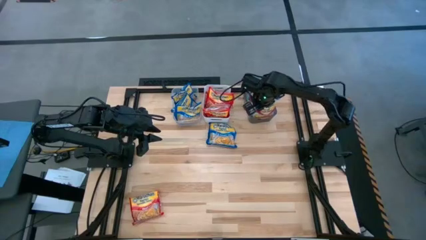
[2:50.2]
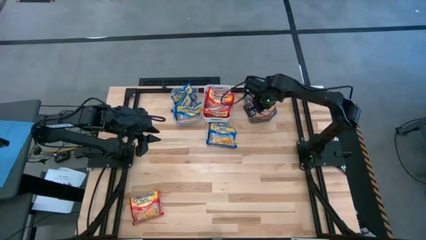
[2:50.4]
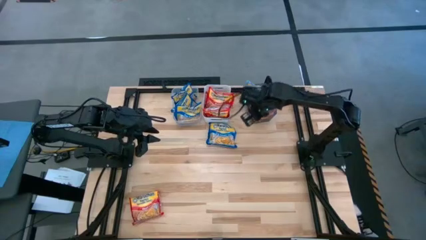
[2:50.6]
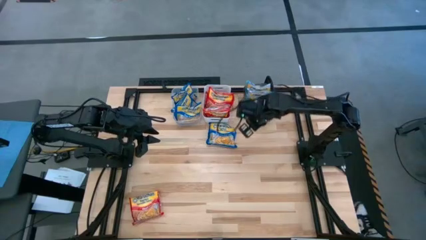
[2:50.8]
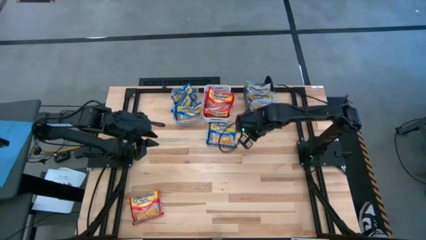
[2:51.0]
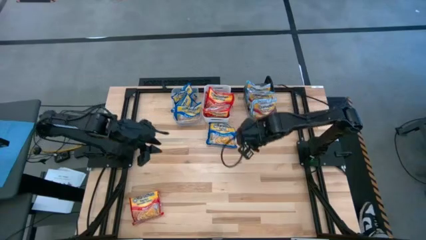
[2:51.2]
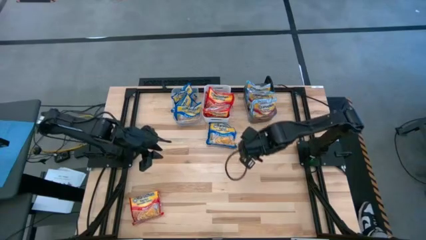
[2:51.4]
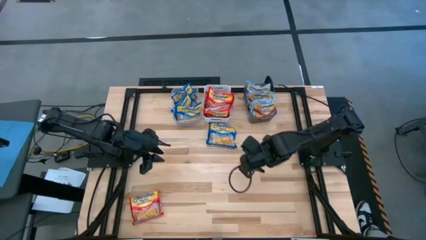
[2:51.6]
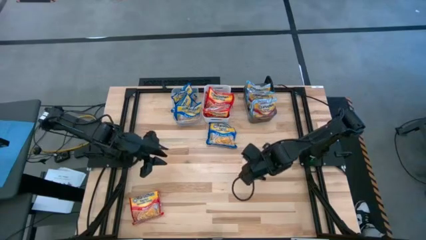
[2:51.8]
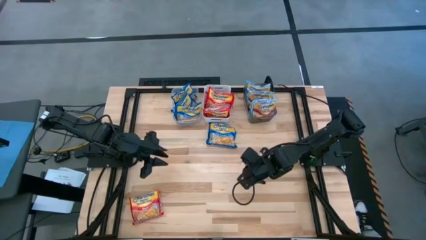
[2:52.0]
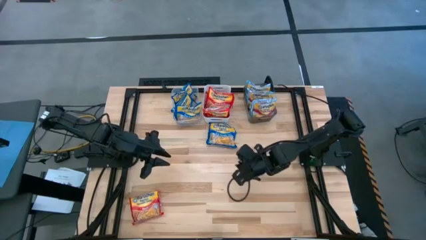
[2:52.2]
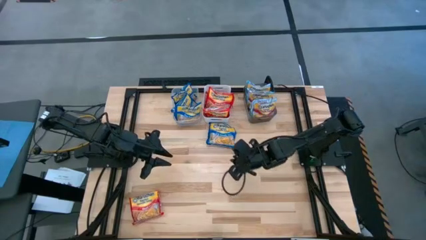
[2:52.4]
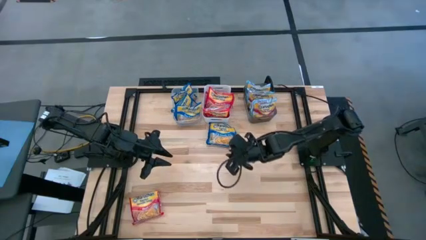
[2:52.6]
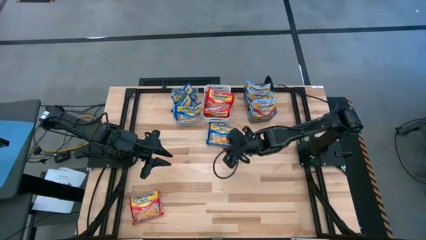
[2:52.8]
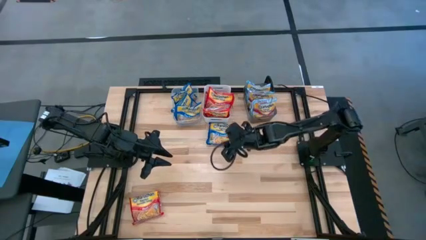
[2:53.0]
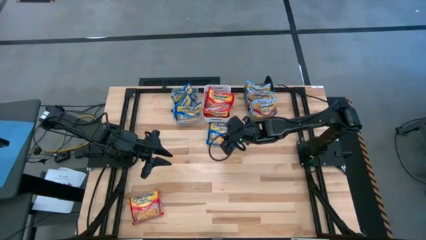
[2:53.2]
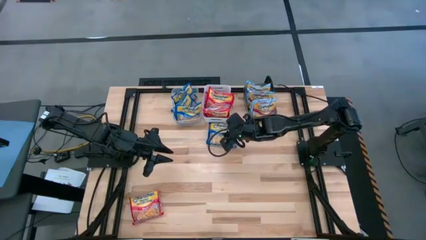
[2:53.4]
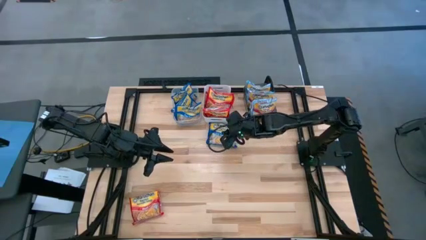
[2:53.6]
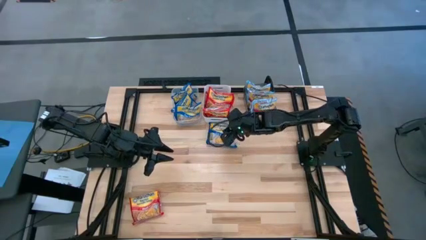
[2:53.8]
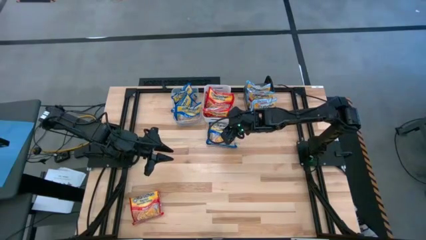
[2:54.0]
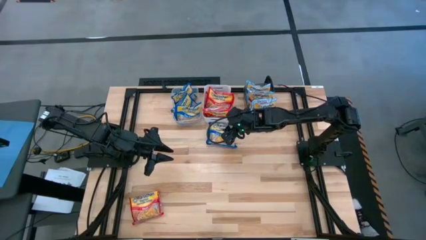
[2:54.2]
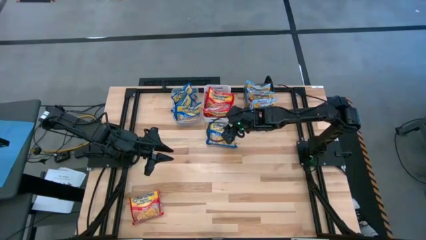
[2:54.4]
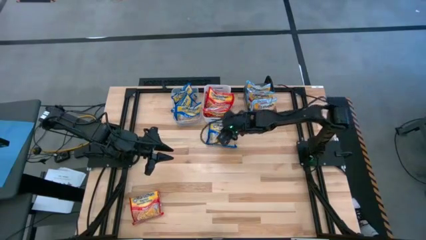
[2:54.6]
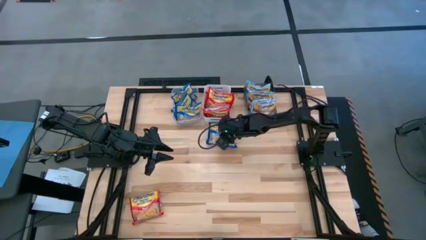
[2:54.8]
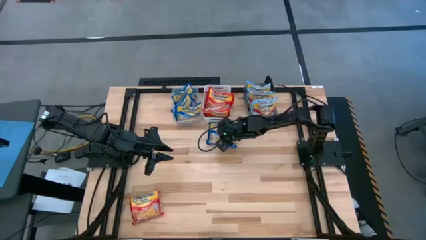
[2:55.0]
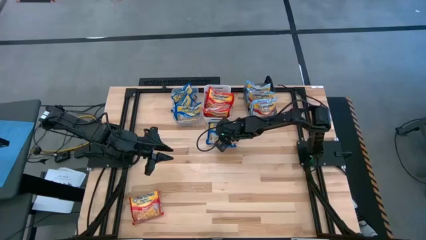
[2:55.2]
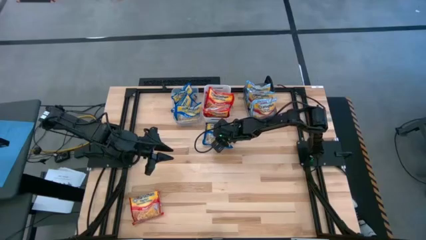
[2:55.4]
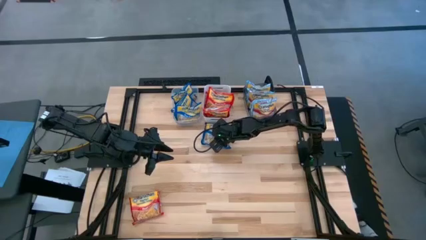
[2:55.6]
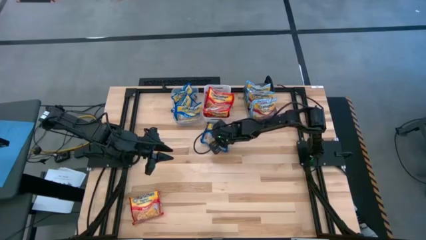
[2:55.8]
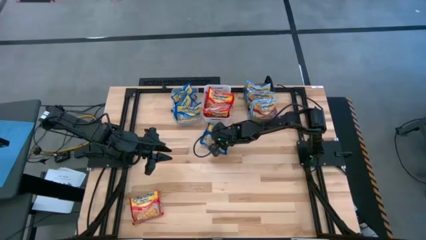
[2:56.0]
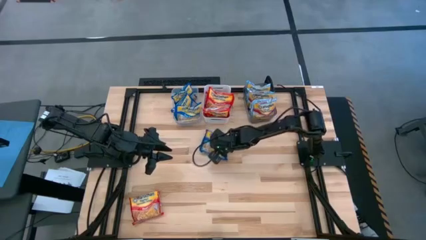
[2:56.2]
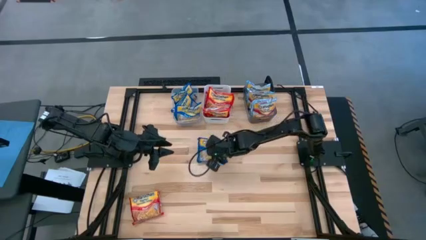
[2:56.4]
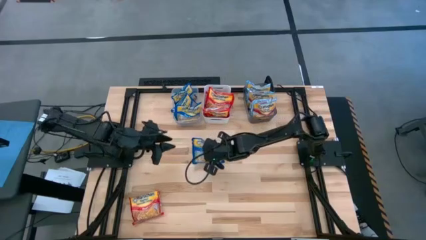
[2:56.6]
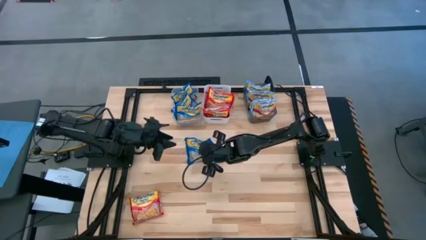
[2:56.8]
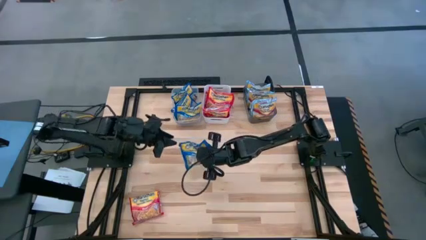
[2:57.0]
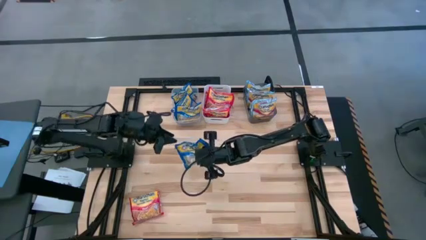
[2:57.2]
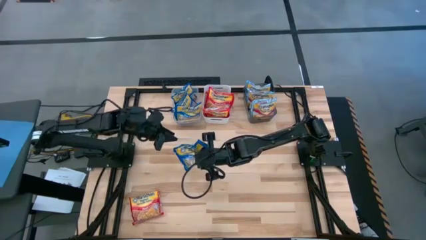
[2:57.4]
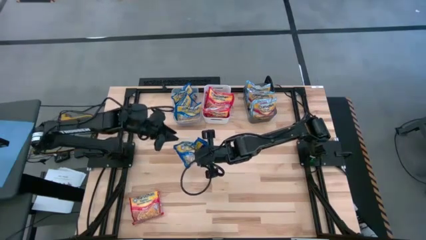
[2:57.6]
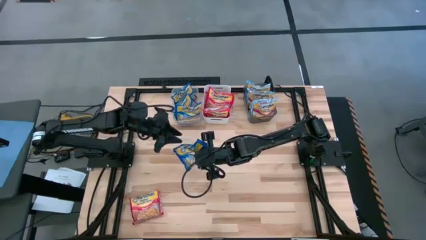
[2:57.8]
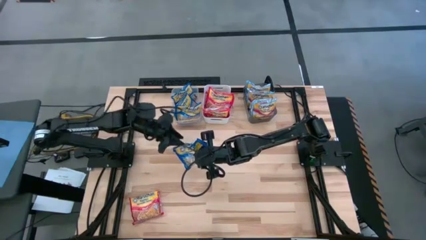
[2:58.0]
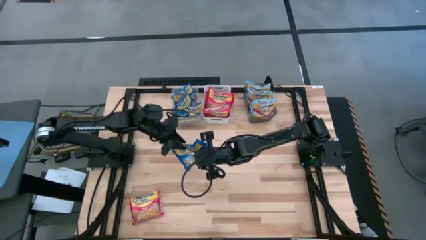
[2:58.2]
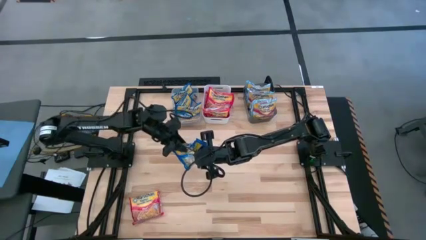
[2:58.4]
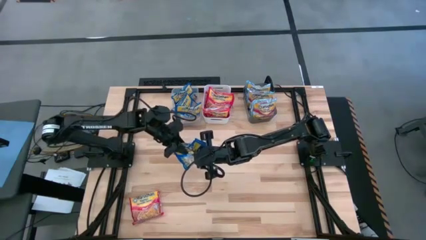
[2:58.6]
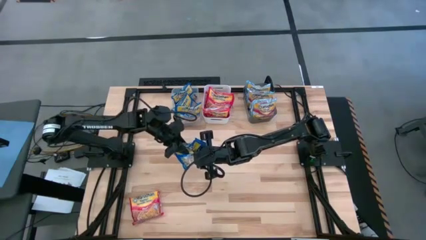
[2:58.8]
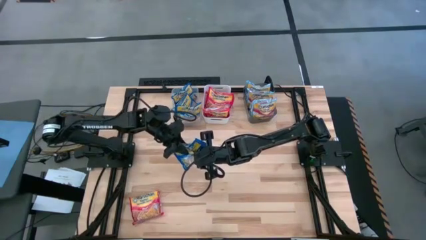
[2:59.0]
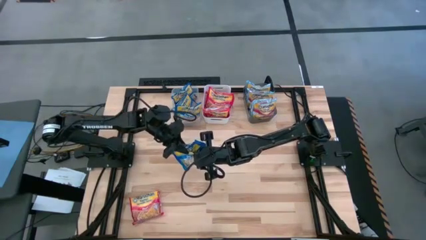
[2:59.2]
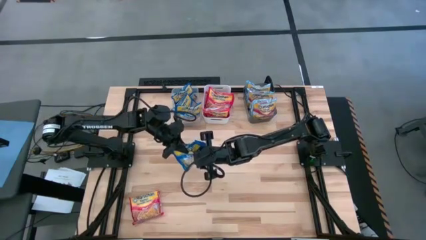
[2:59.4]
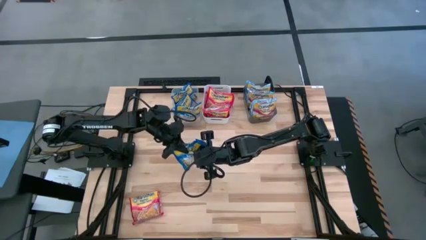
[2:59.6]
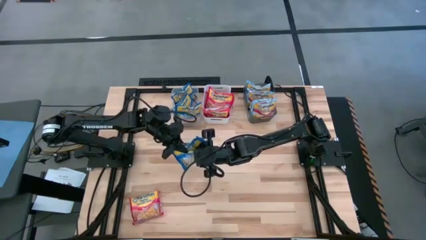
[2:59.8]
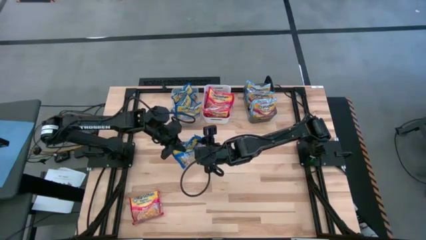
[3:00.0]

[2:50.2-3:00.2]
Task: Sort Maruchan noodles
Put the blue noodle pack into the transparent bin

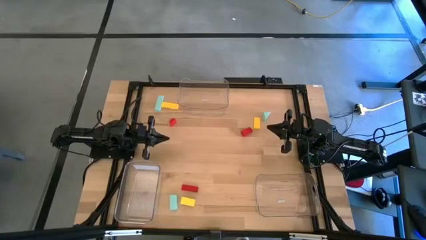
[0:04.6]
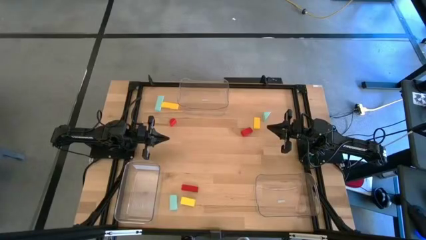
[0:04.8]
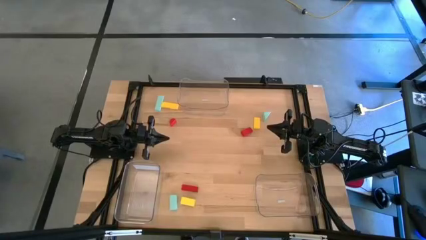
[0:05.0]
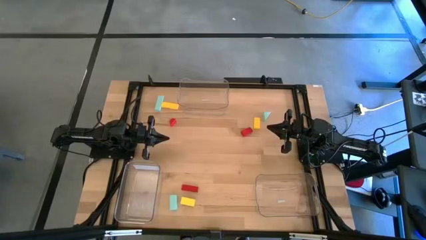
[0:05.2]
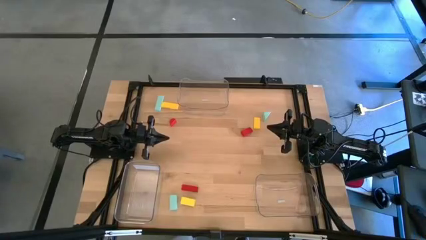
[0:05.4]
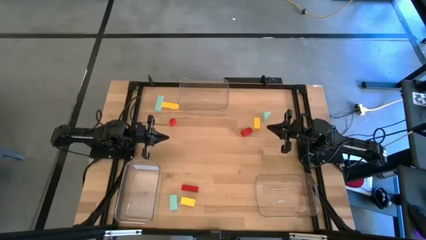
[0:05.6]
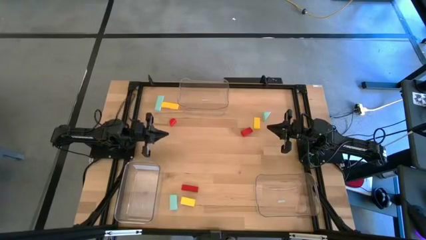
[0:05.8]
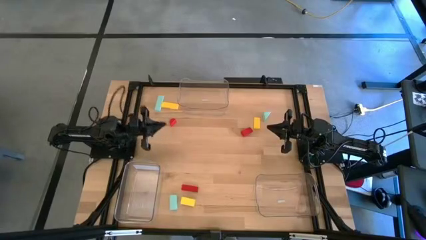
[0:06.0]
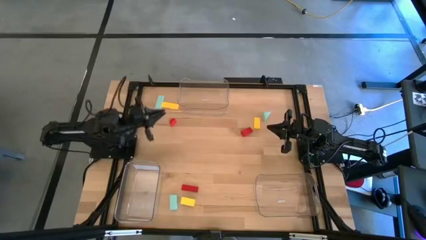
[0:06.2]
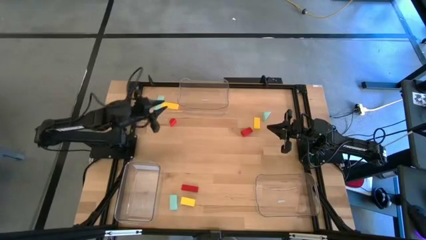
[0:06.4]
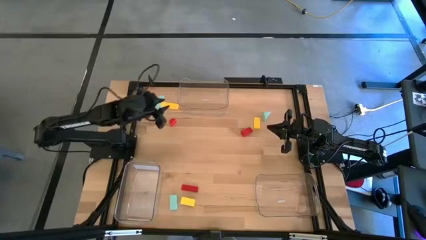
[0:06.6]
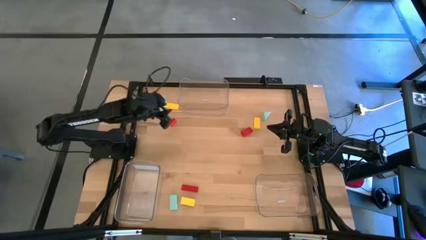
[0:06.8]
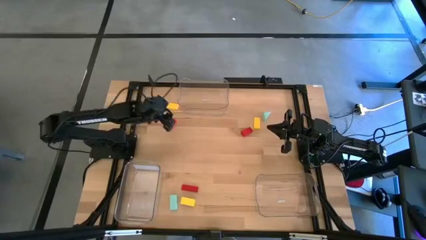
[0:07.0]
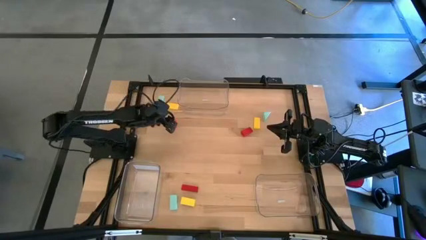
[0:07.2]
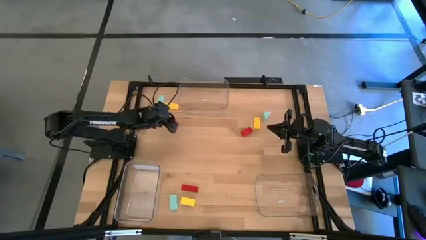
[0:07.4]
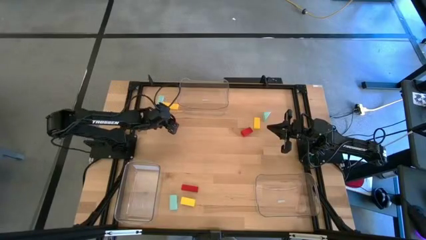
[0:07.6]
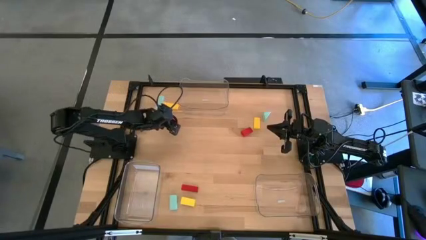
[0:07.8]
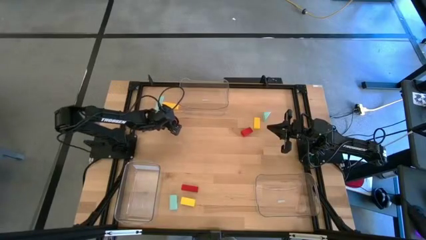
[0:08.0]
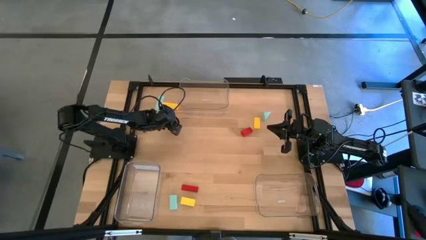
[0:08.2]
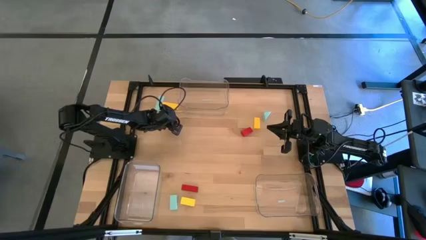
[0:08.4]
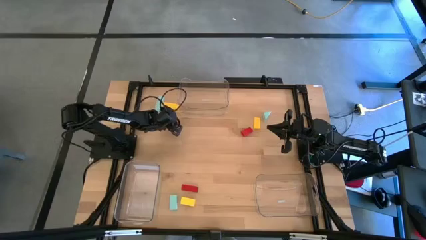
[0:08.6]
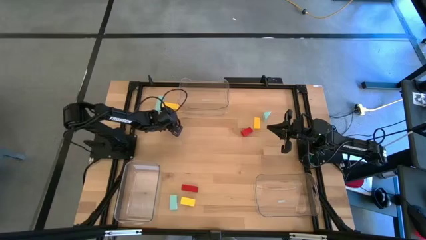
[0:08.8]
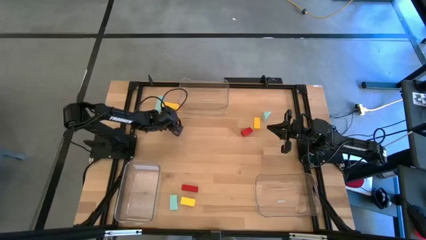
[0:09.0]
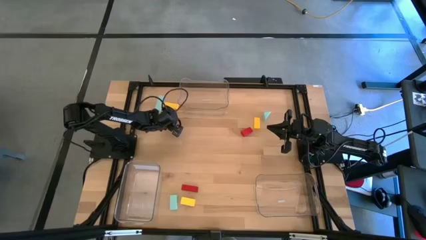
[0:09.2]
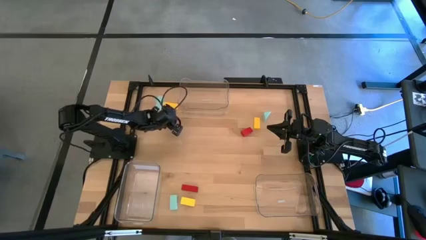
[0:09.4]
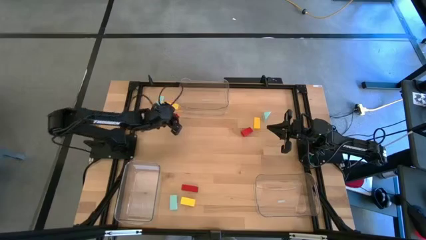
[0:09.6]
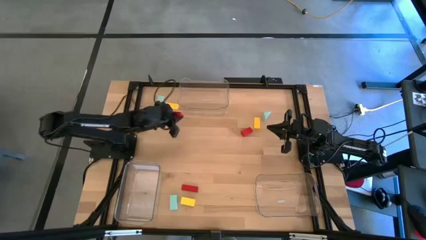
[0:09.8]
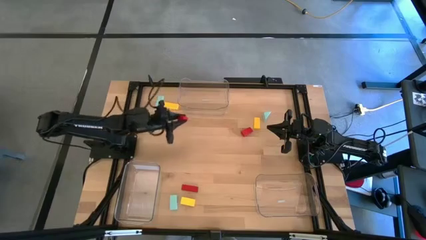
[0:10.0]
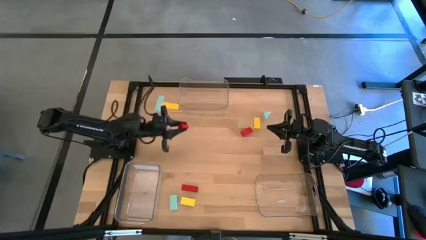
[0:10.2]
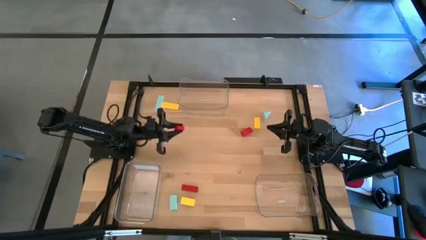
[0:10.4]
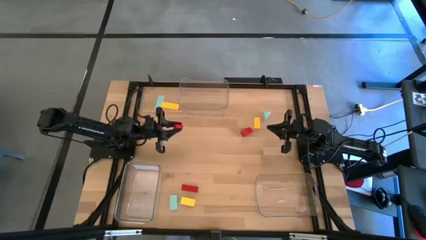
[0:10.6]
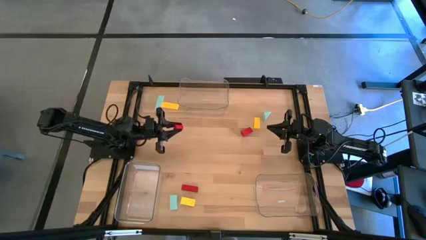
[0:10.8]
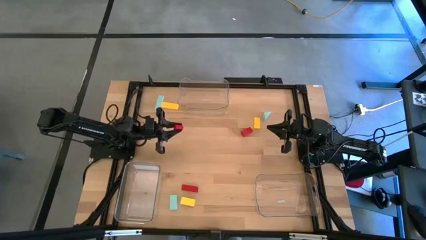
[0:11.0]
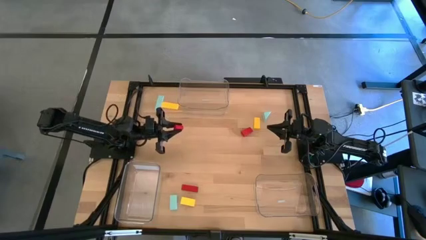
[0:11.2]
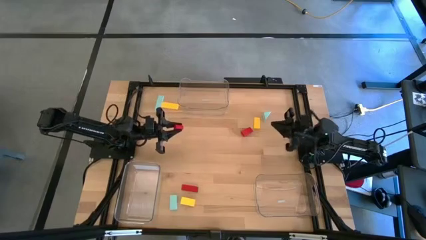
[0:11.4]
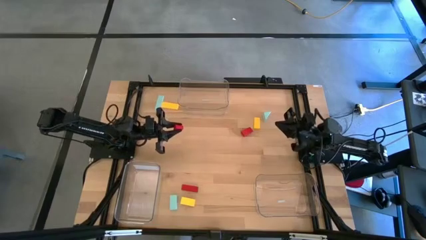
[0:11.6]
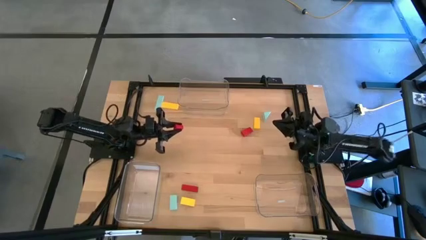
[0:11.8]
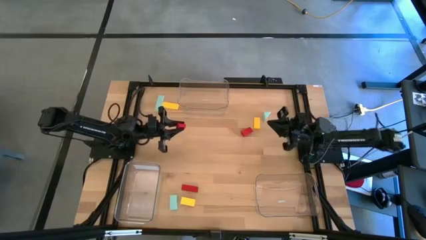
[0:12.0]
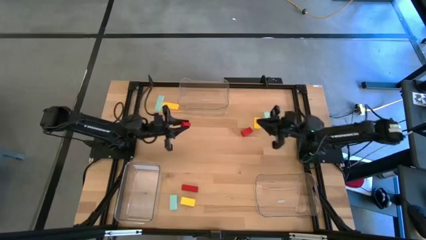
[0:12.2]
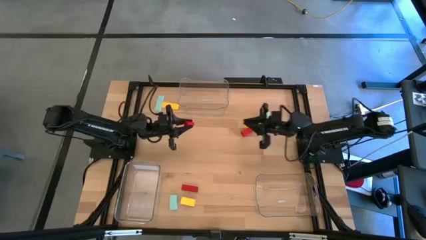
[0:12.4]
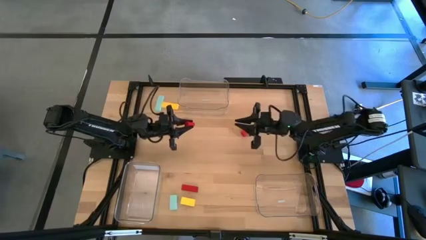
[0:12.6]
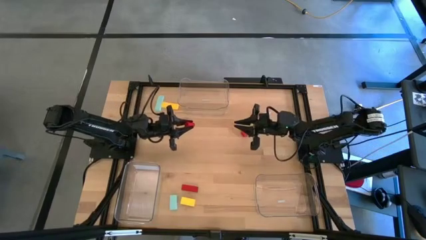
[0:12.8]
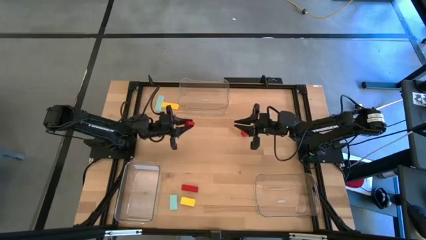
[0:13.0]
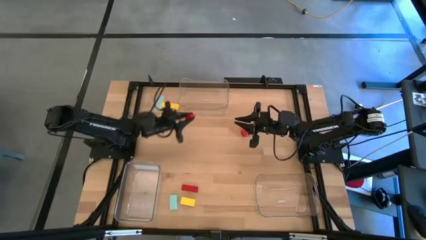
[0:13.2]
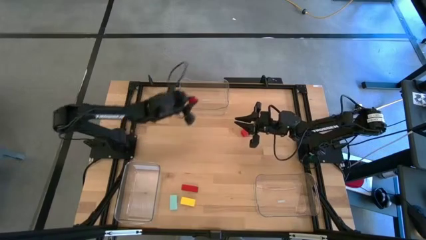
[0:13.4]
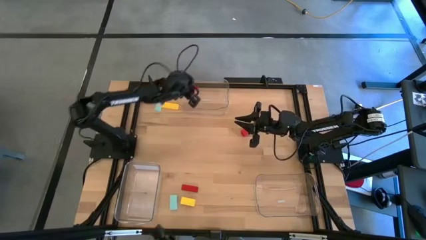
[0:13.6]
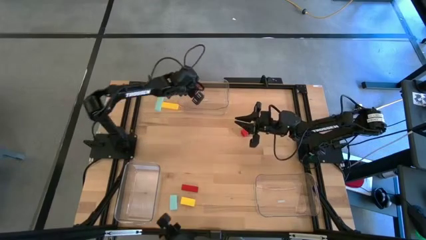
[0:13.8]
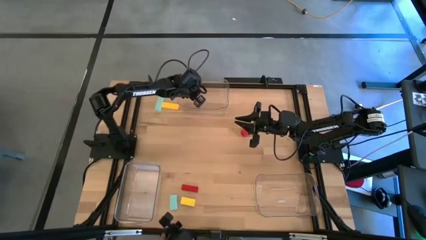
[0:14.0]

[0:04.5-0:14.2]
Task: Sort & place blocks by color
Put the top left red block into the top transparent bin
